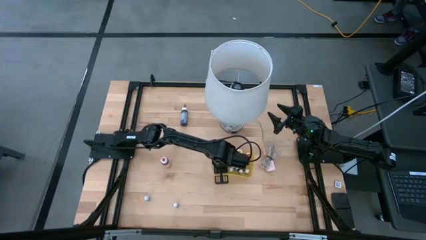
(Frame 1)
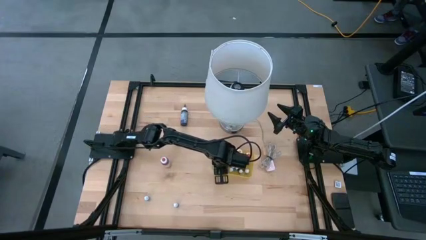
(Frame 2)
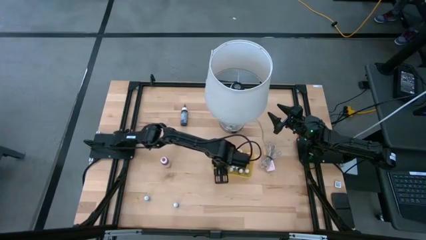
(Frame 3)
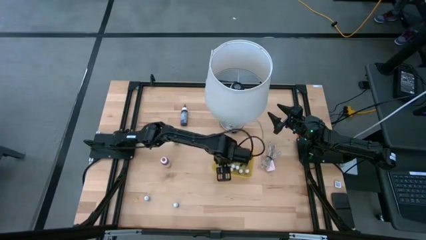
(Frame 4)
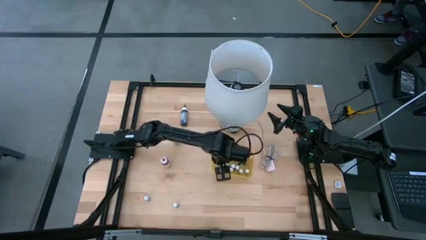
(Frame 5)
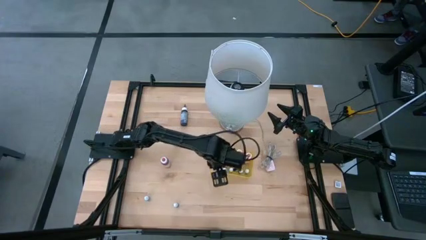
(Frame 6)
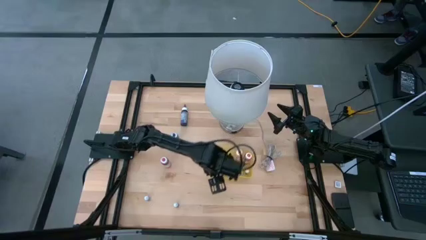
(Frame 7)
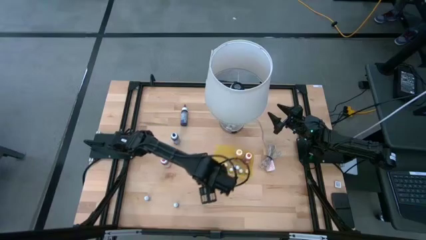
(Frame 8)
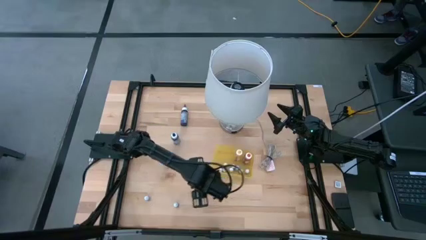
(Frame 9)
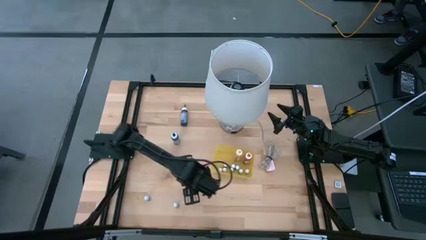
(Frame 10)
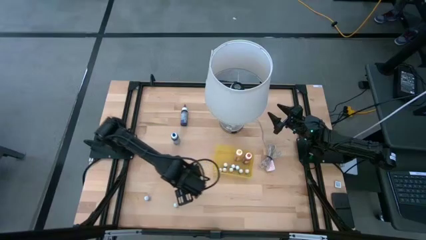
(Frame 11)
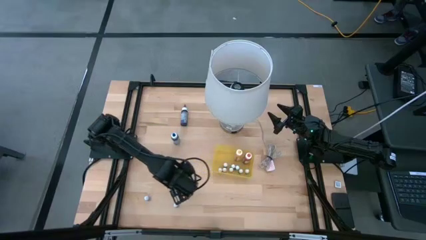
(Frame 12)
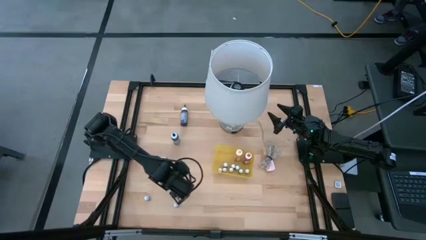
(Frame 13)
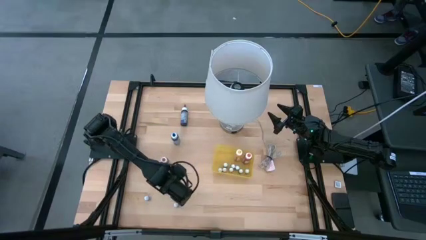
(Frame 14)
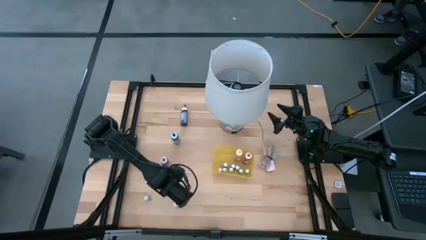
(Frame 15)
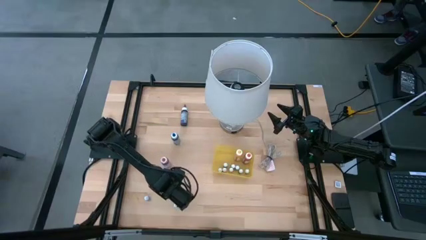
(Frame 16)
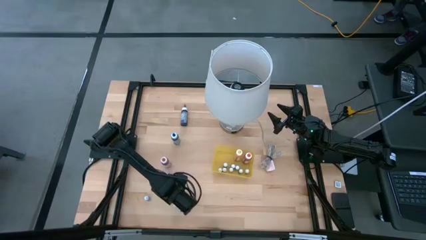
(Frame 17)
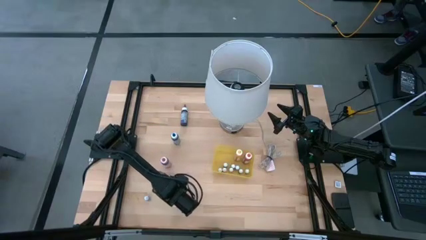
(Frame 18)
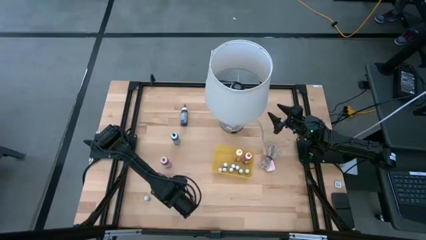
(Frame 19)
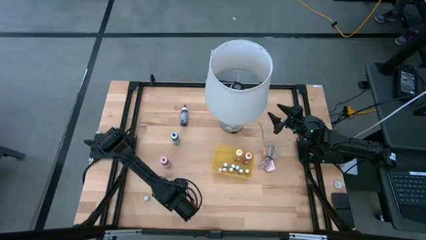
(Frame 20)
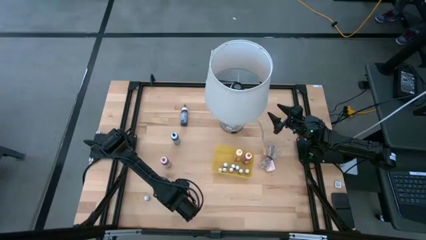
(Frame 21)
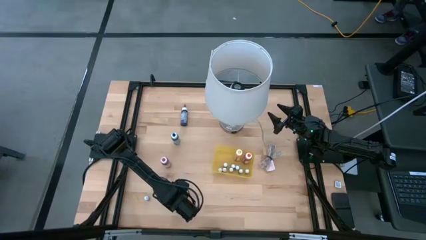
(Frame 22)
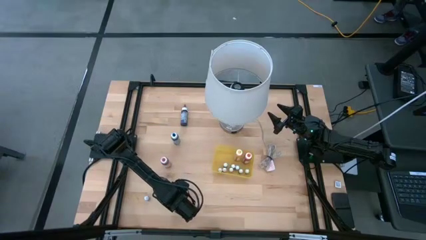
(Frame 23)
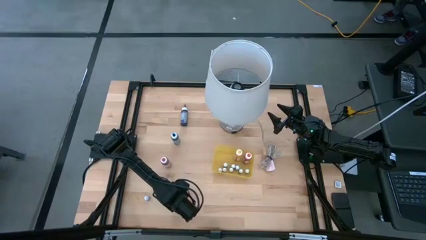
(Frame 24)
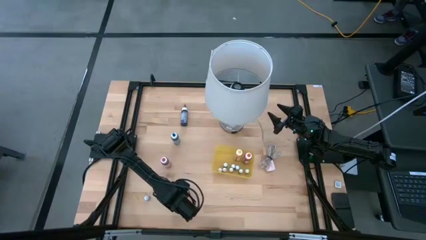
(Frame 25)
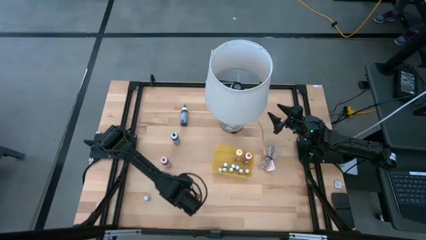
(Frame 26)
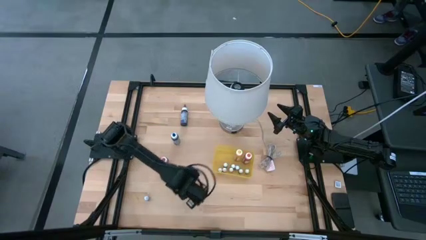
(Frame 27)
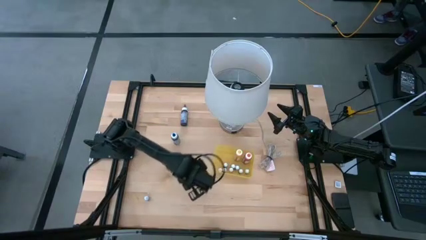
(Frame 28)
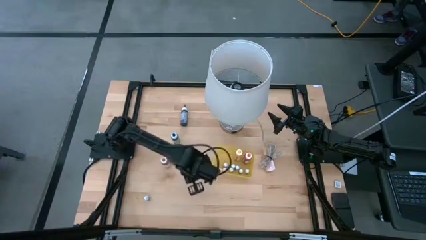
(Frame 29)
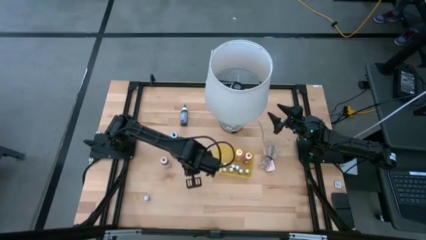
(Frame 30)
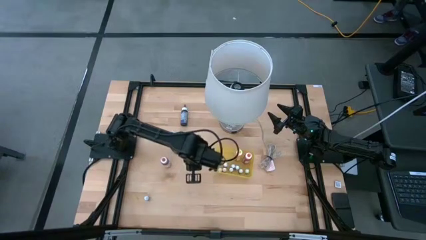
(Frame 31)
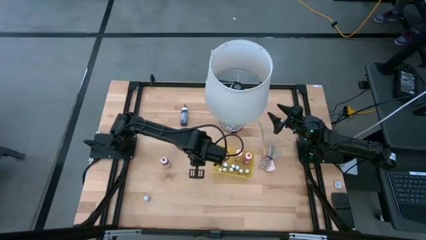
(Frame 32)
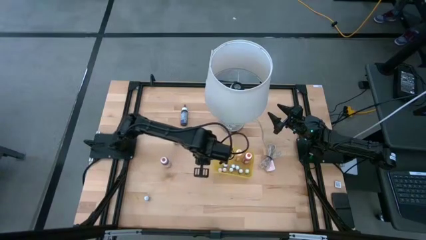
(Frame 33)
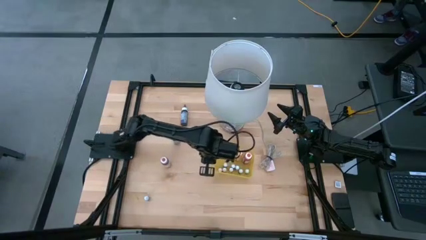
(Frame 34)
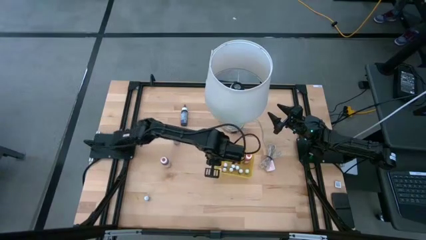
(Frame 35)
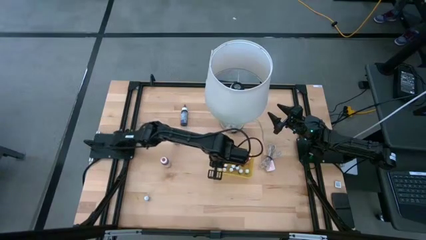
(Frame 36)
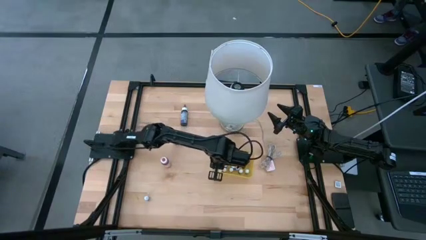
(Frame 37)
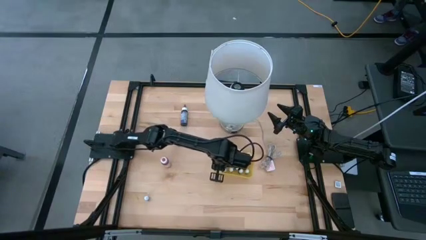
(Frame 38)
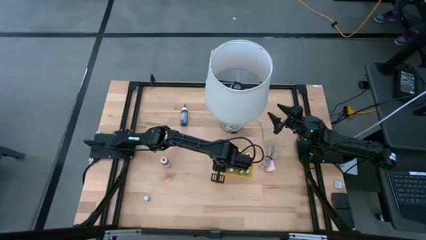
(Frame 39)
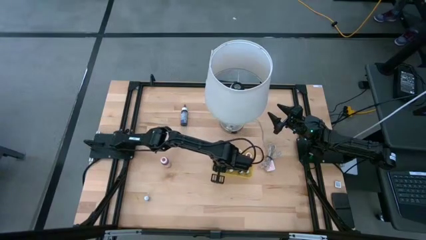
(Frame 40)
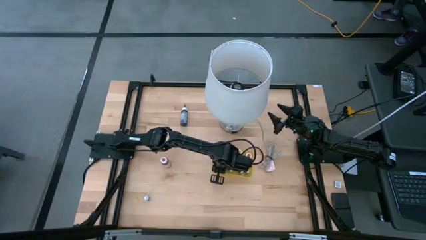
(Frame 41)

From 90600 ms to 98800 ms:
Task: Pick & Place food coloring
Put the blue food coloring bottle into the yellow bin

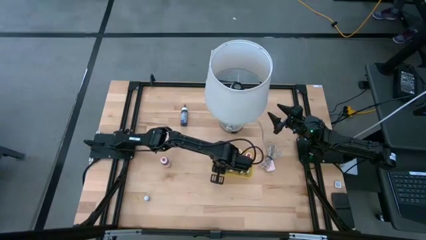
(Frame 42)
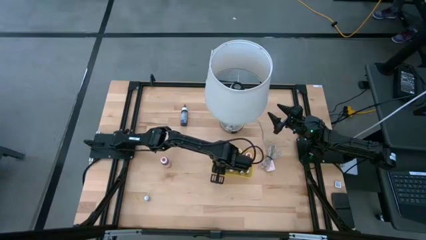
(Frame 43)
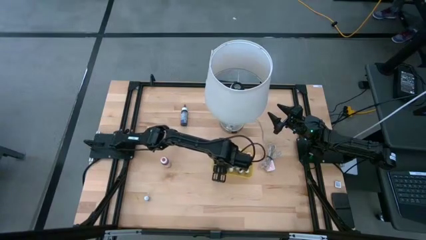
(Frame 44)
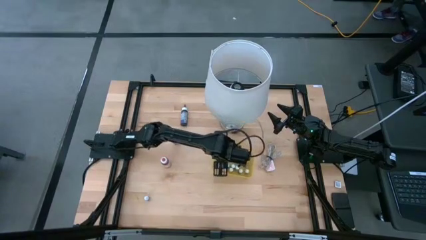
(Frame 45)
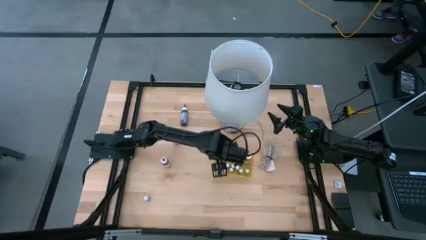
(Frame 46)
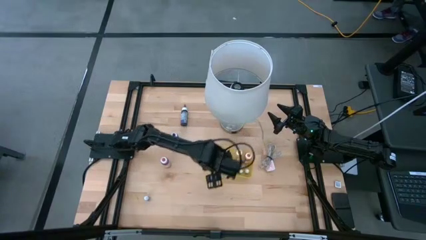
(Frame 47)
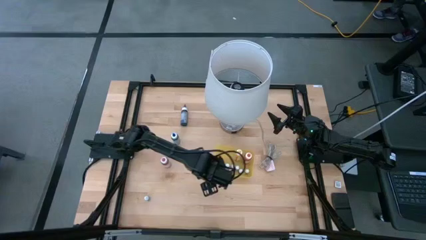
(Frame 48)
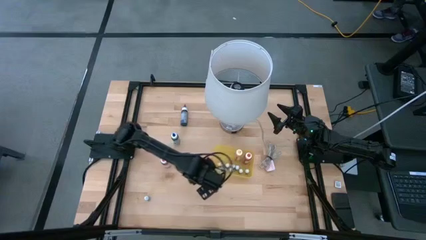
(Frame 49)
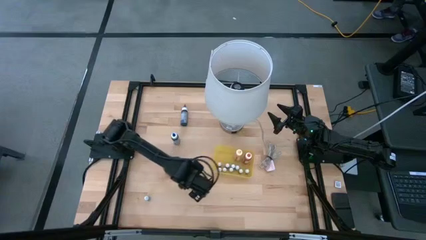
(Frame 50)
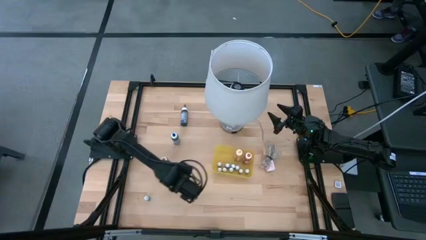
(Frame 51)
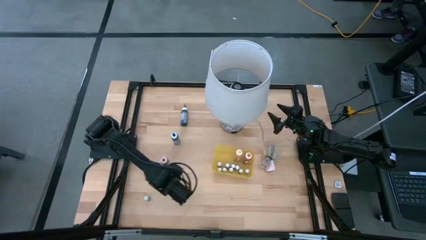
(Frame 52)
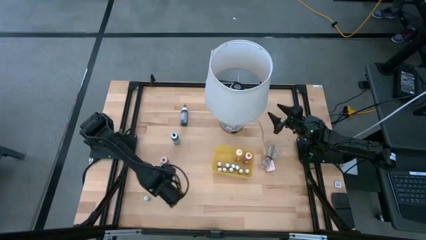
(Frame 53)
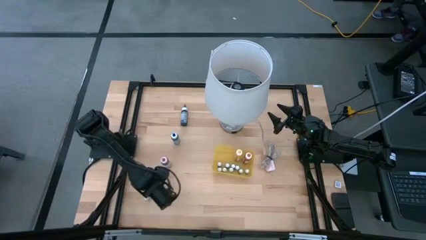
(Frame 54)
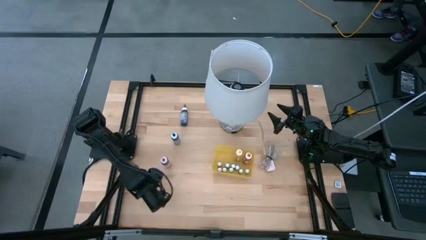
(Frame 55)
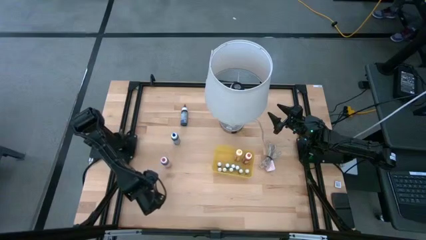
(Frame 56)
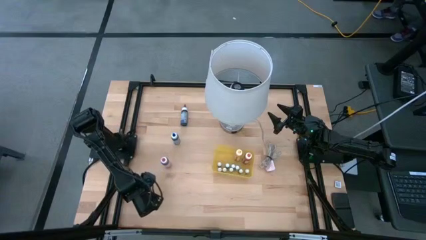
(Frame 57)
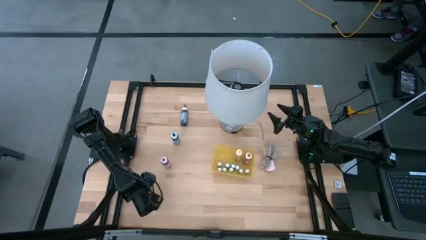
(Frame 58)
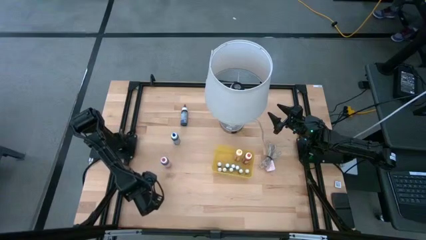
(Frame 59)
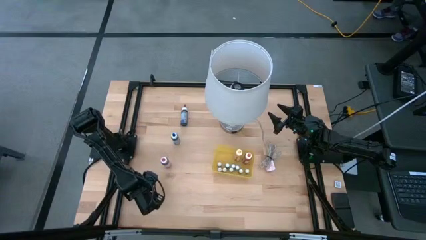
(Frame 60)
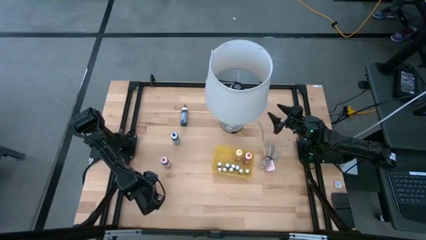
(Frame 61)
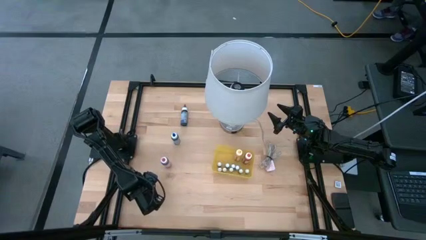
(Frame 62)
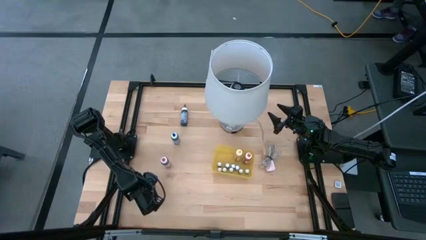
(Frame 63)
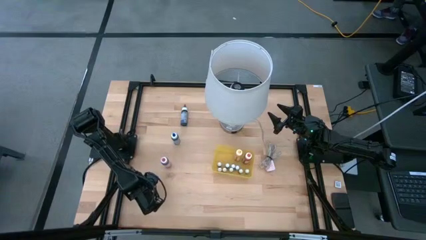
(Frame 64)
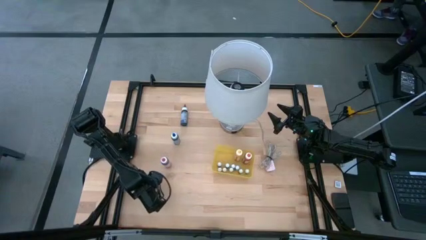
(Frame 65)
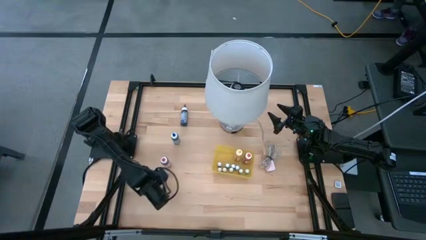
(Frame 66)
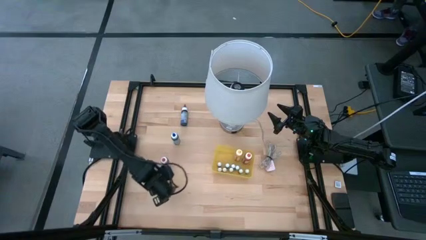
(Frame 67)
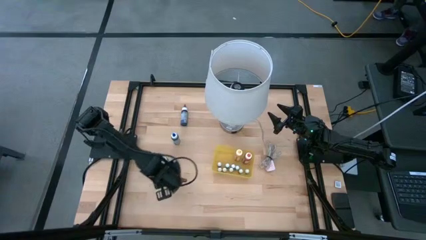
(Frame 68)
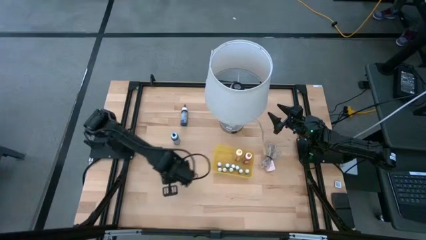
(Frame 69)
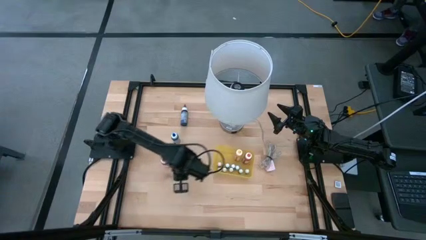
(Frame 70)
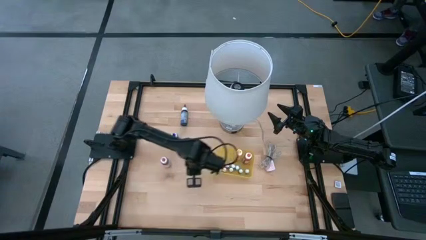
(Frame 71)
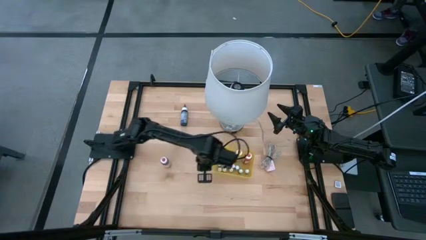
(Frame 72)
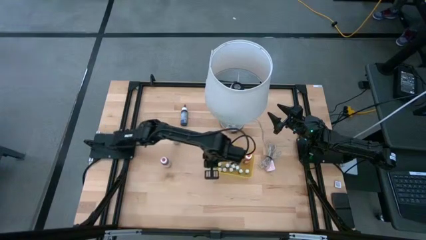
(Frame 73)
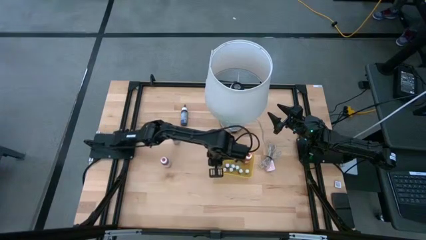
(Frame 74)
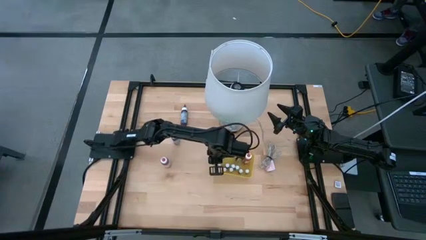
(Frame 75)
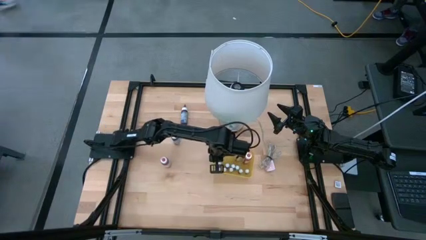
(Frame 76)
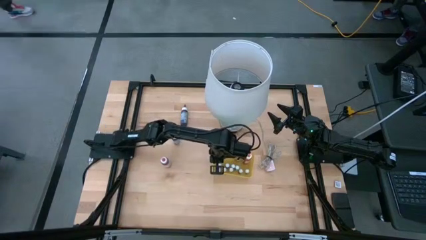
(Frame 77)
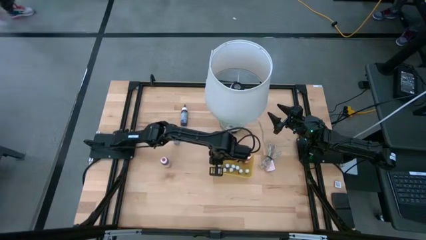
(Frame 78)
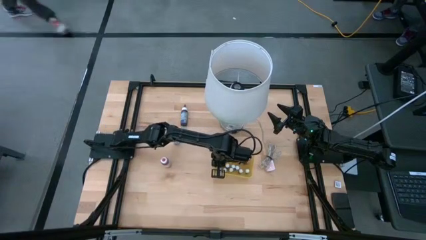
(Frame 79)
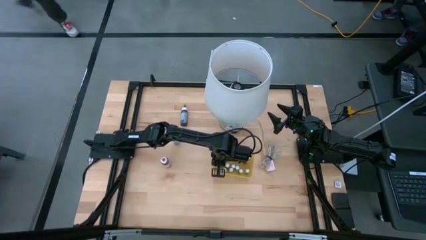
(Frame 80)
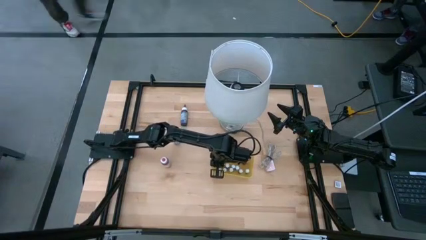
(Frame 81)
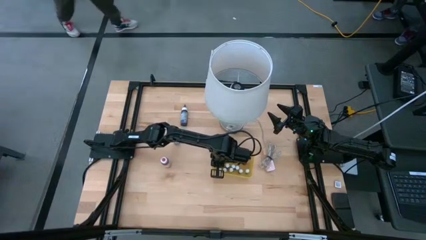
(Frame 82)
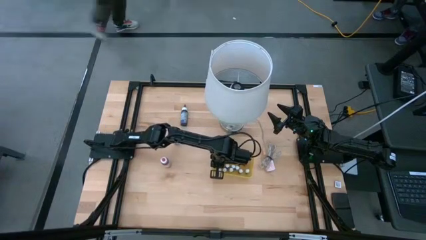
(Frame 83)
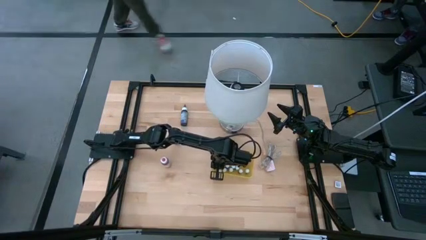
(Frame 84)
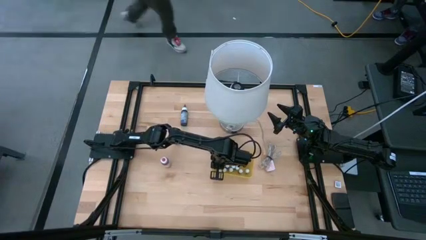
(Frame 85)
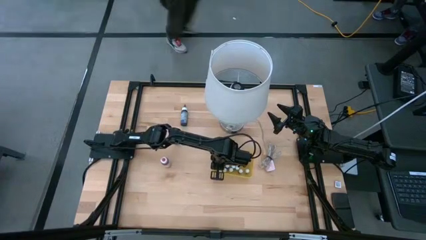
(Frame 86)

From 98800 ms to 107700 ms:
Put the green food coloring bottle into the yellow bin

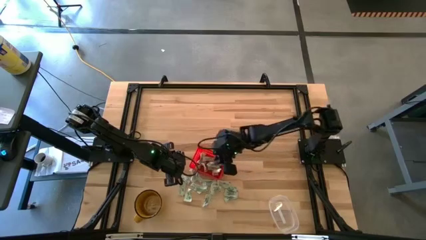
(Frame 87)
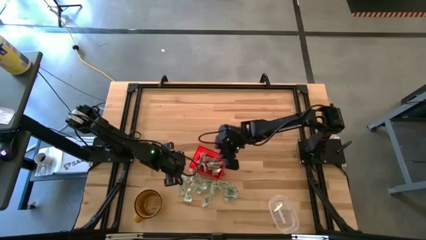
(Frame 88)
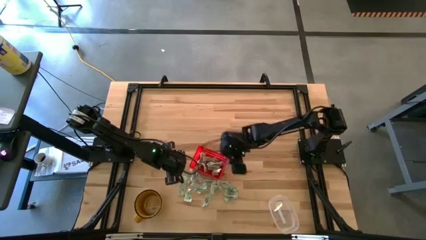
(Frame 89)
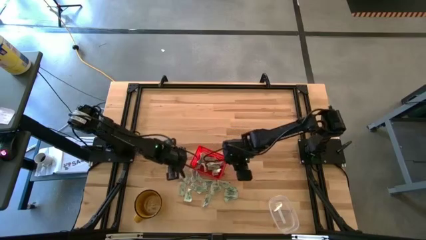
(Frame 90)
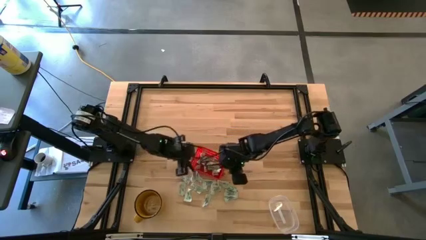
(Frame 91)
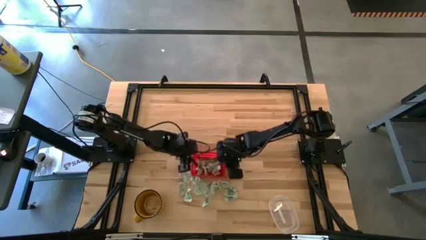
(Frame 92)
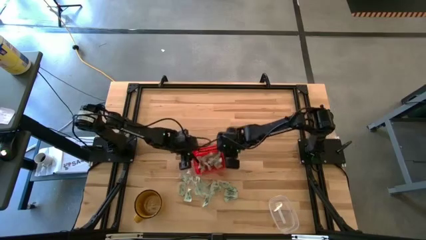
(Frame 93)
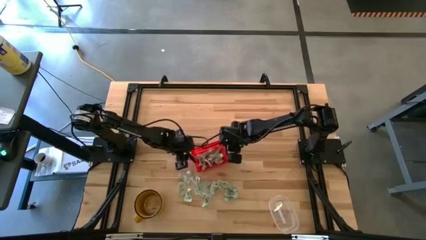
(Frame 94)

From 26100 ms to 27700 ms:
Task: Pick and place Stevia / Truvia into bins
Adjust the orange basket
